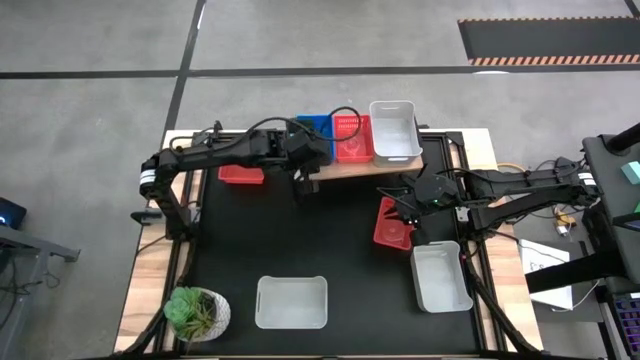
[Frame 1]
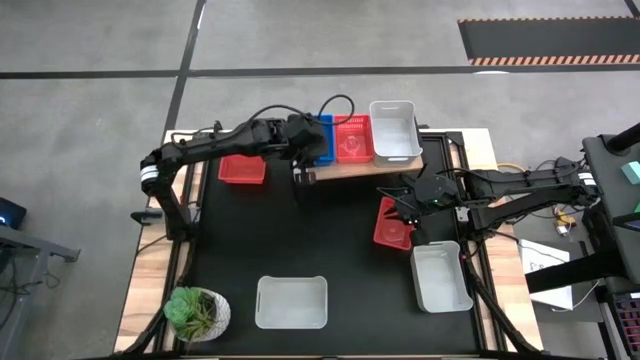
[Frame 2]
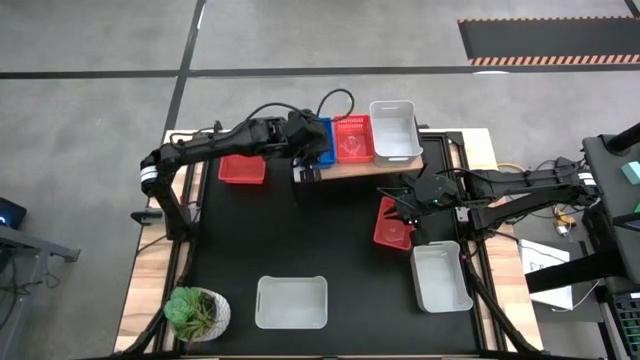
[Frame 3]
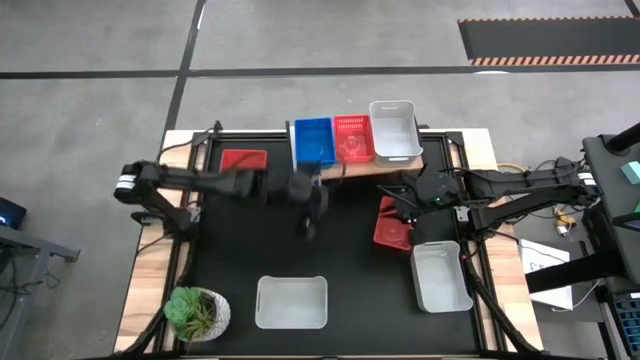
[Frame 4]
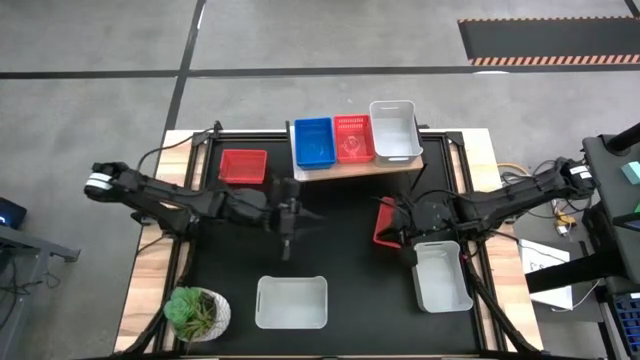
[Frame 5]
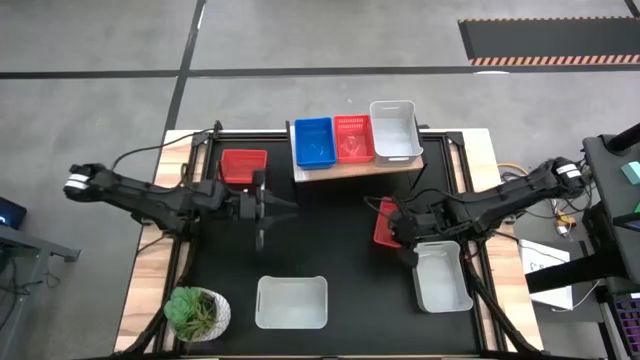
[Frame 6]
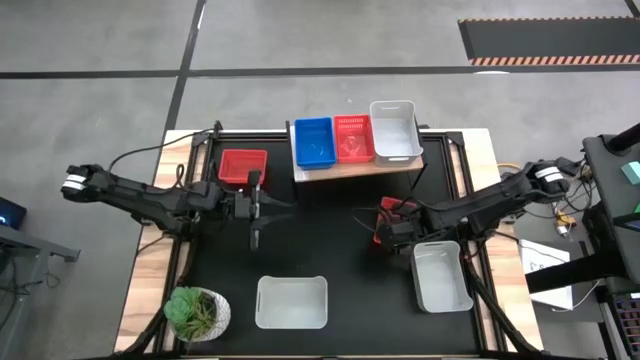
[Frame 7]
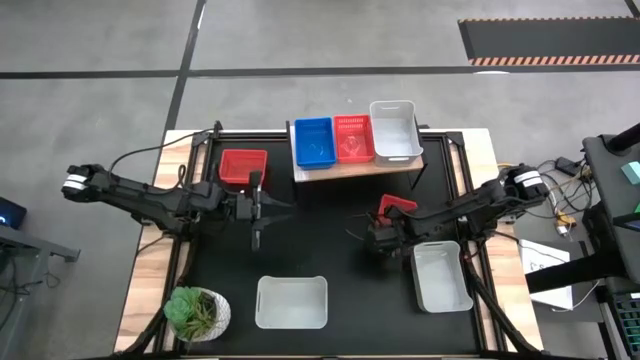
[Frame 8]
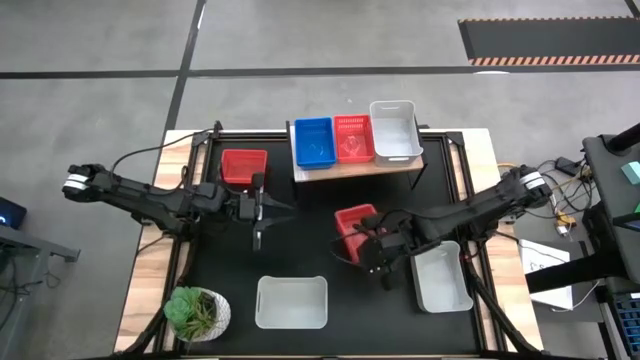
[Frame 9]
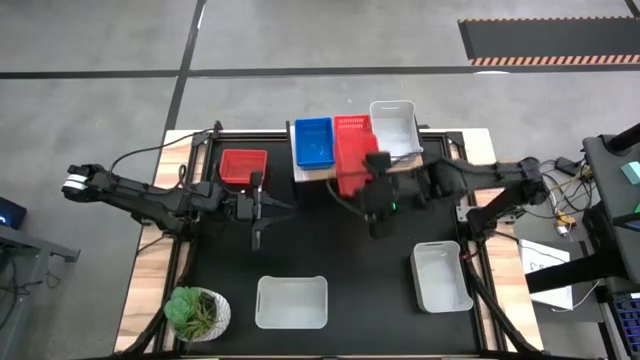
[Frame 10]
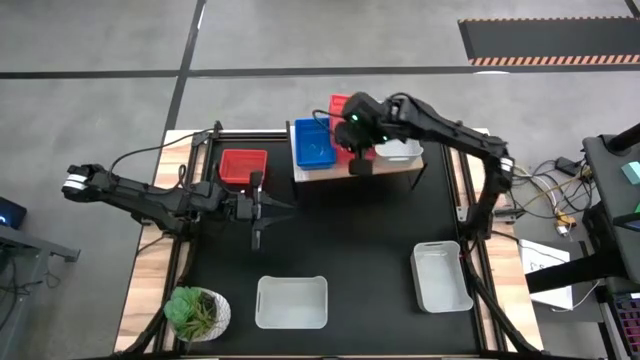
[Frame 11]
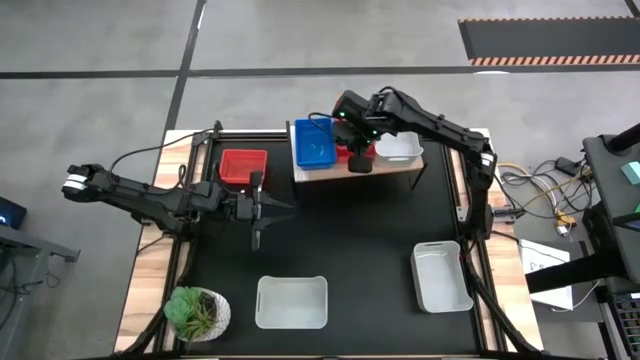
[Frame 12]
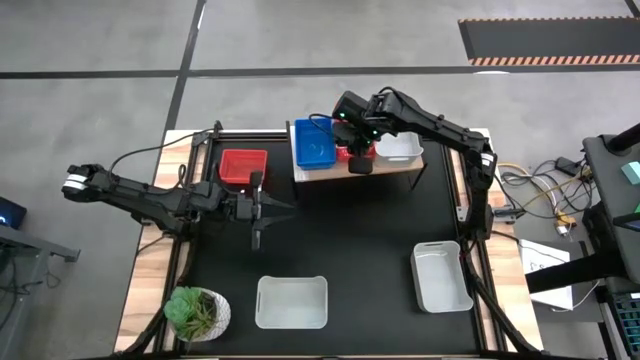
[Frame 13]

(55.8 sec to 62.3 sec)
Stack the bottom red basket on the red basket on the shelf

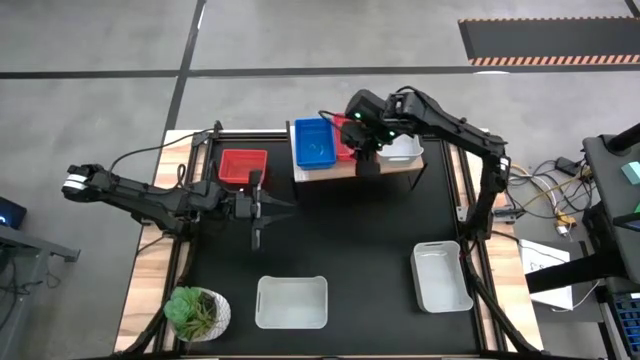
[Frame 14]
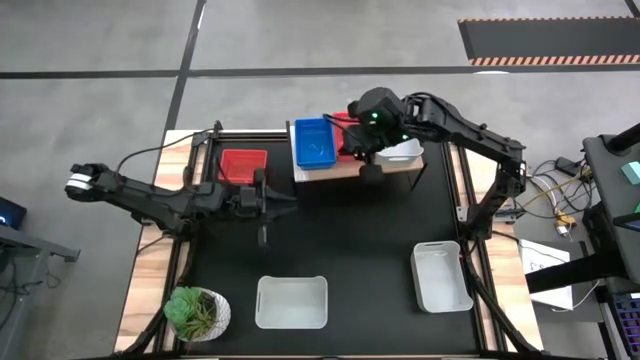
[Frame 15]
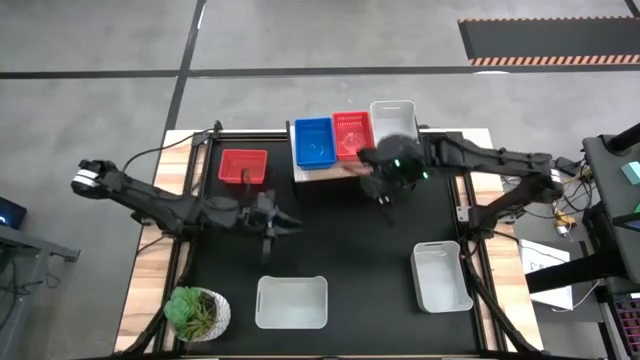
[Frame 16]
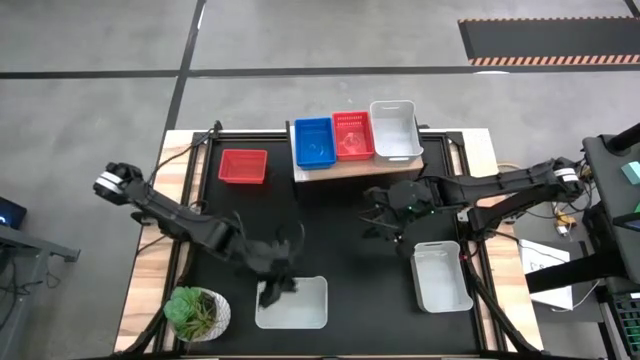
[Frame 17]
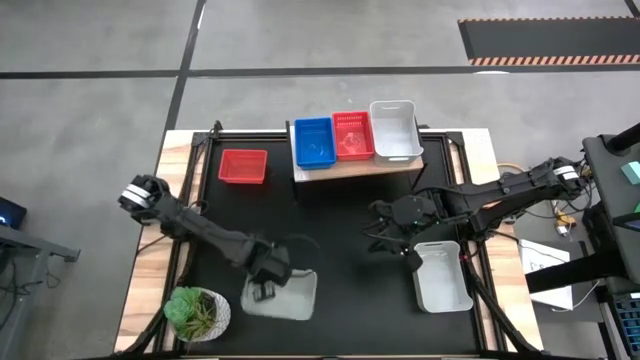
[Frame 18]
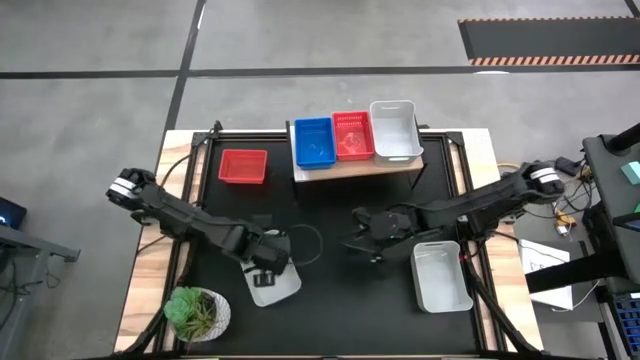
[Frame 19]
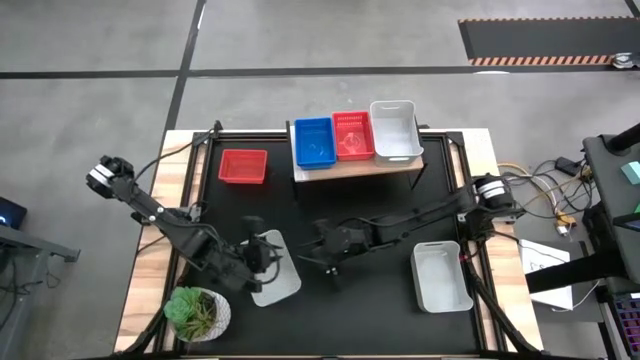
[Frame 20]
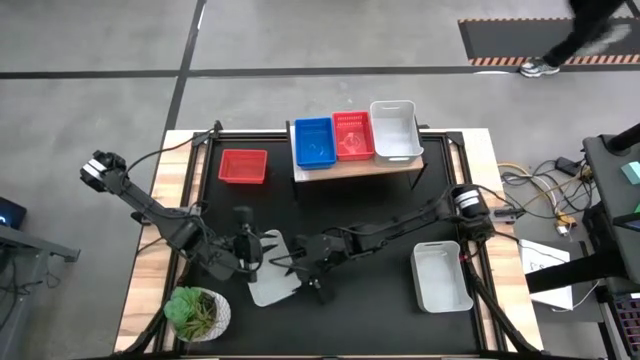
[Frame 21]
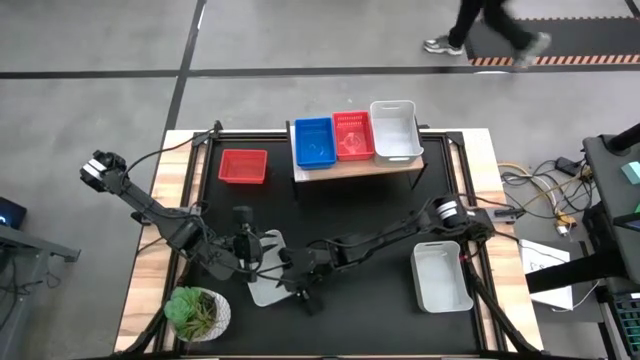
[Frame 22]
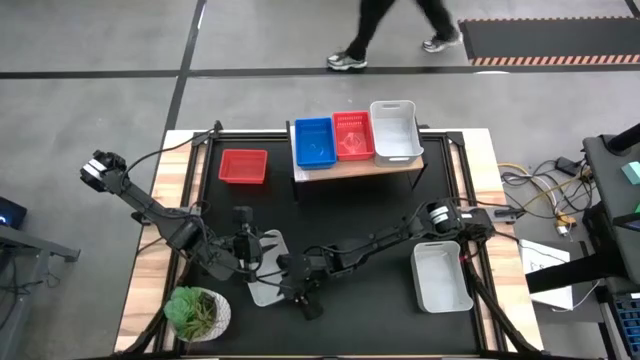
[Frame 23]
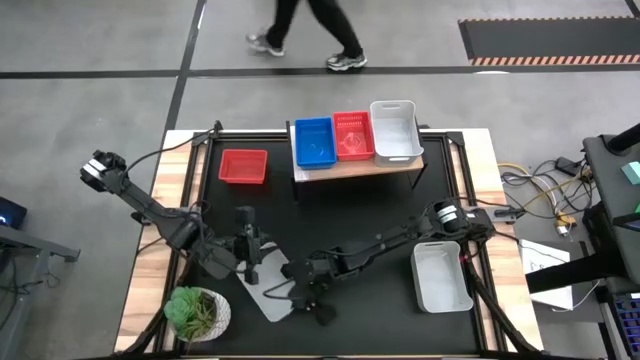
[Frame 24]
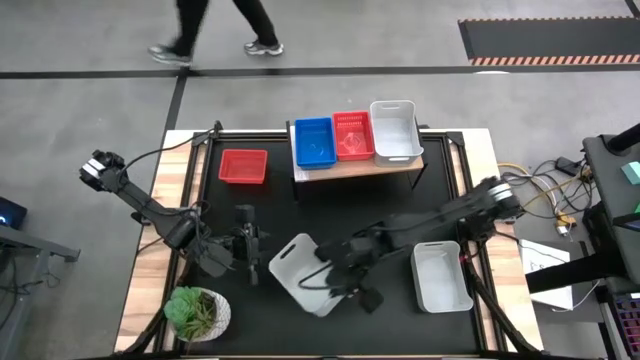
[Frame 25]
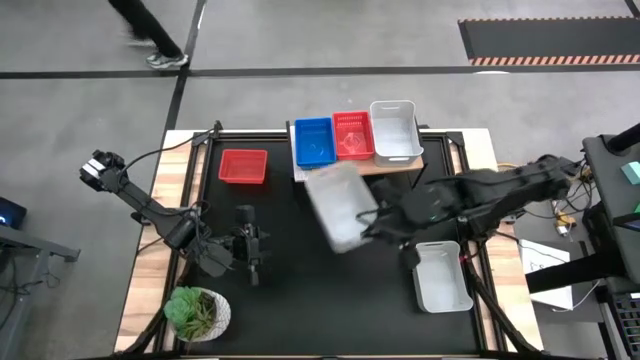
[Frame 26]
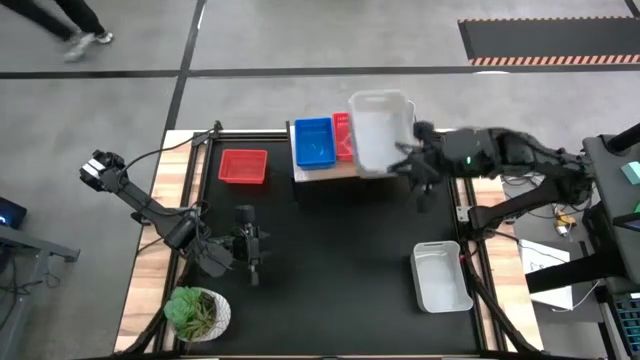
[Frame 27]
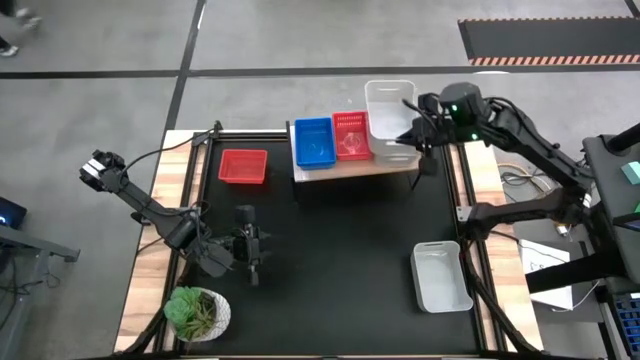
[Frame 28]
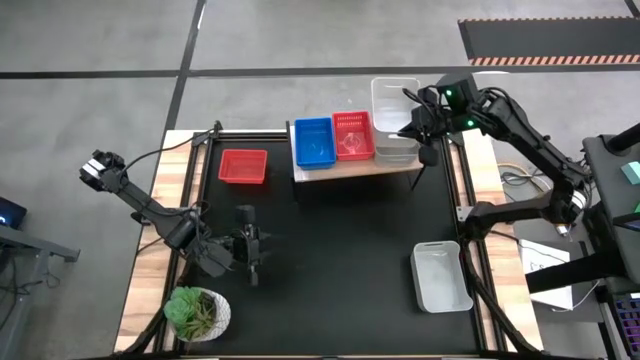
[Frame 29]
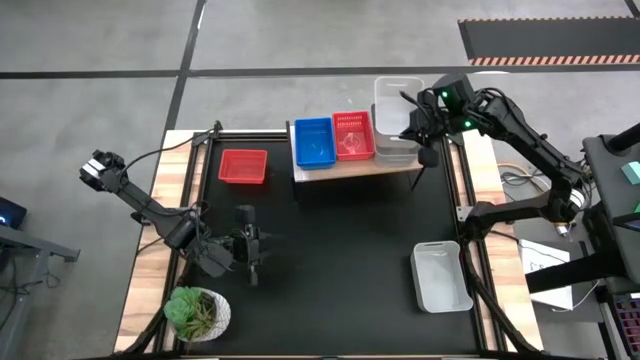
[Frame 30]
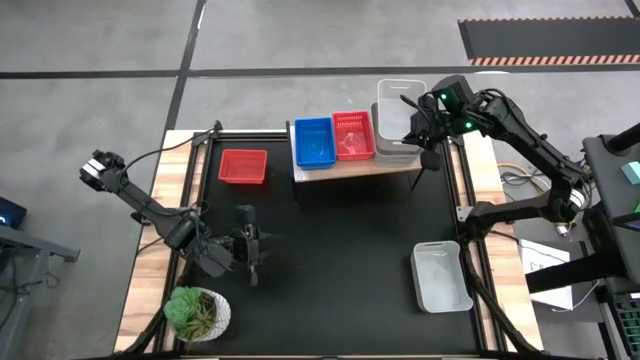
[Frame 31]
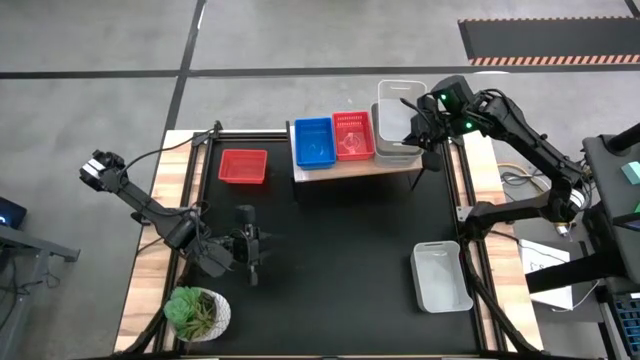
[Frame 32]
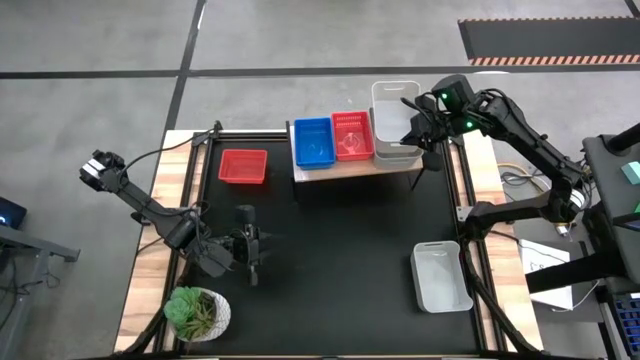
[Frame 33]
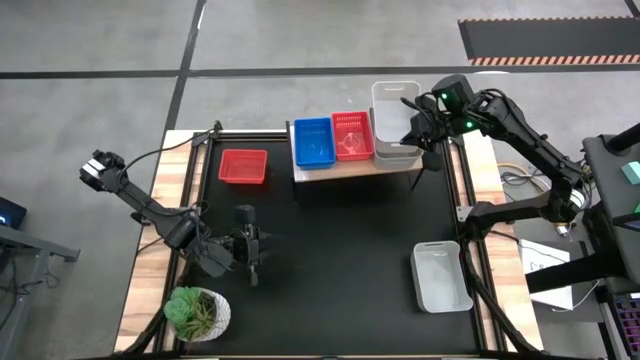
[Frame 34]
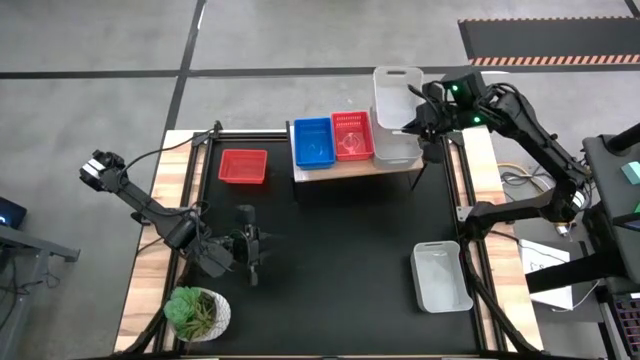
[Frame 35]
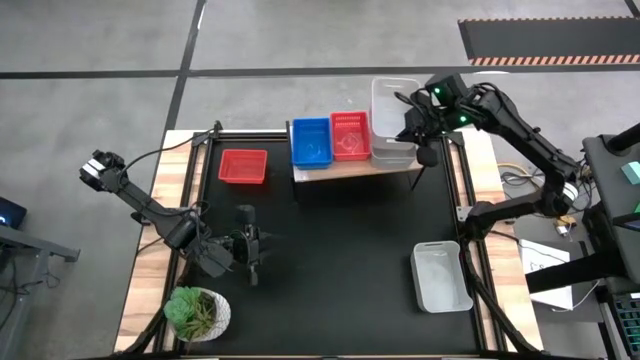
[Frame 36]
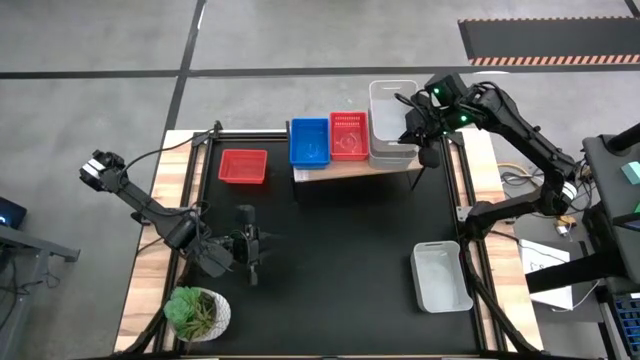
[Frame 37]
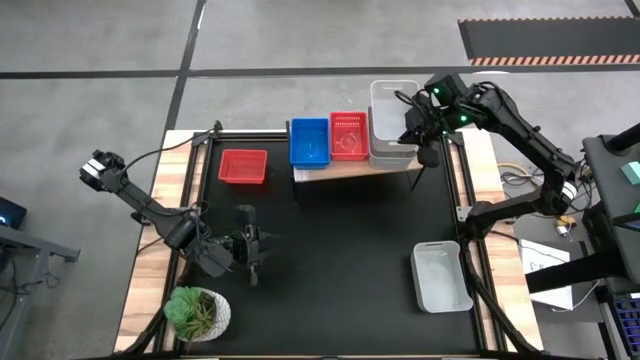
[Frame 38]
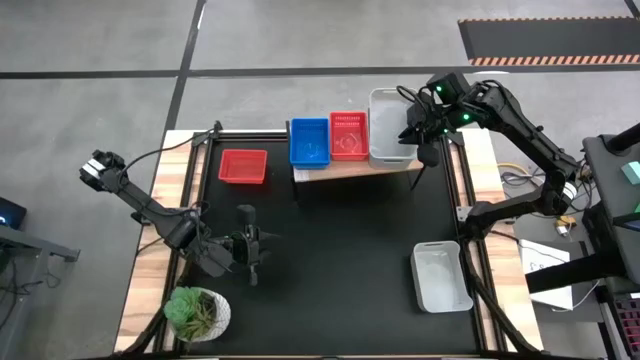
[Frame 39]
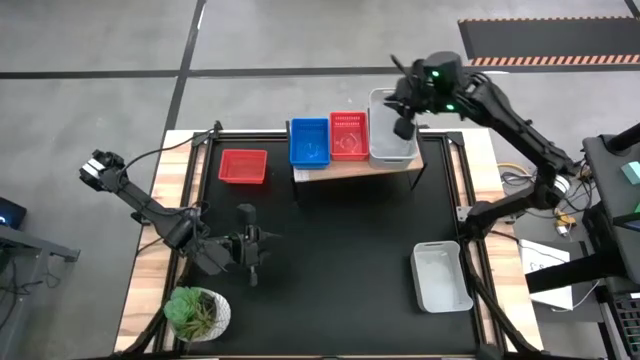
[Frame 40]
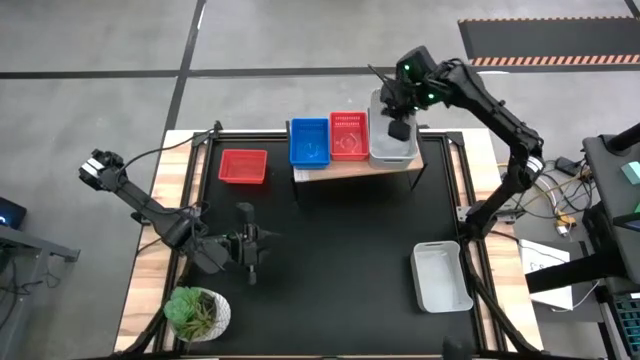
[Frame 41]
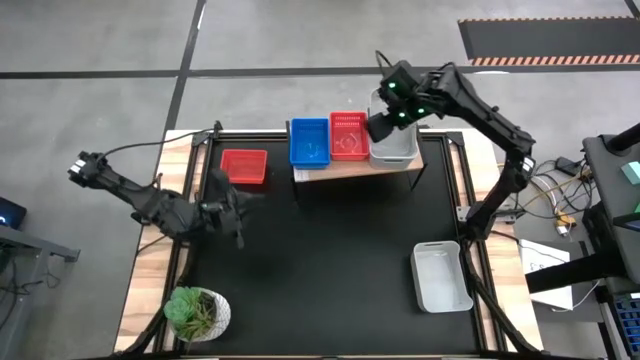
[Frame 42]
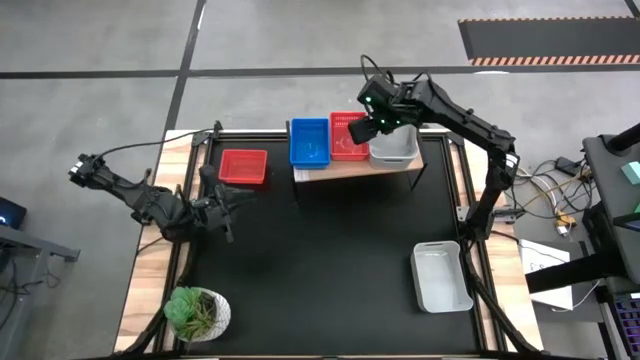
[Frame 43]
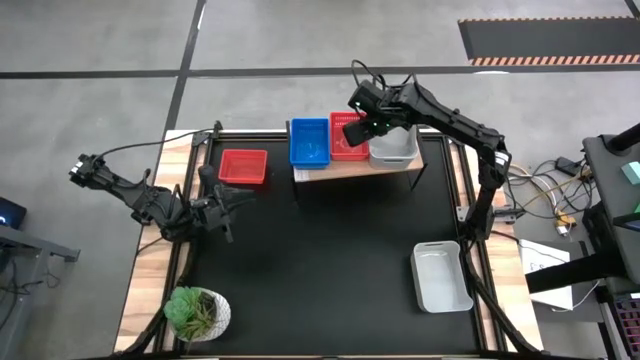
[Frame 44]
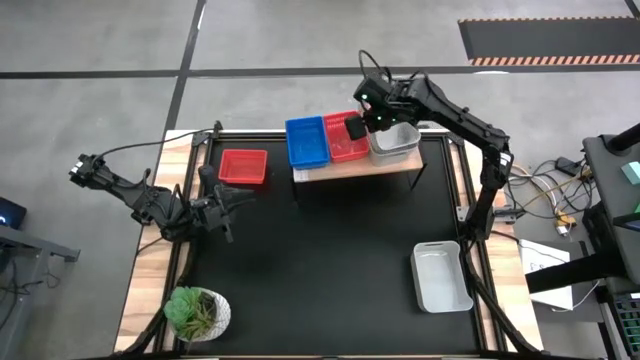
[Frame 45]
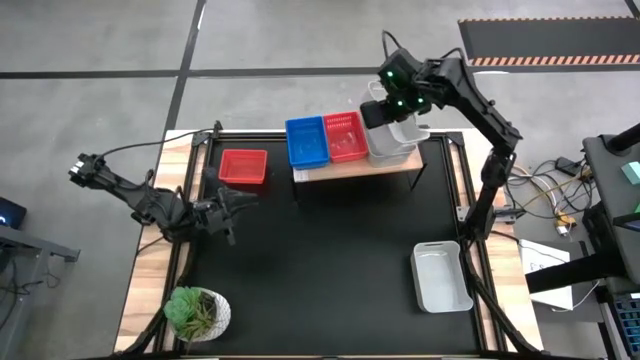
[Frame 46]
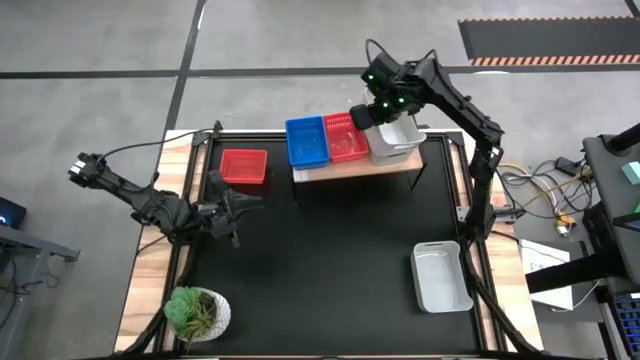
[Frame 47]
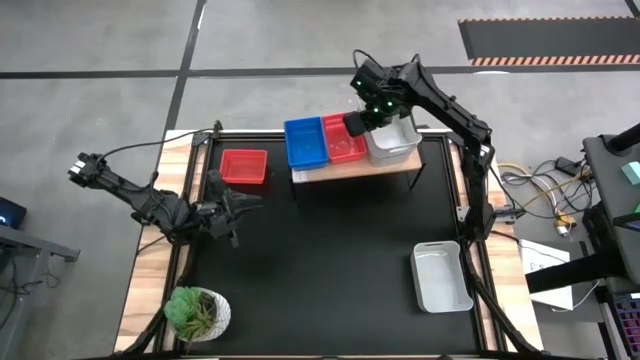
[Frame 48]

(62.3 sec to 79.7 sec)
Stack the left white bin on the white bin on the shelf
